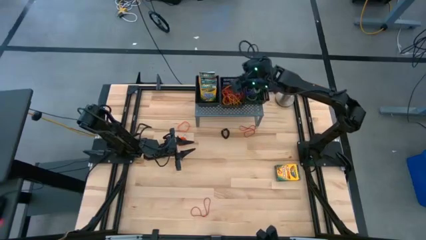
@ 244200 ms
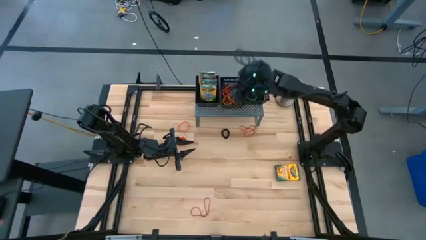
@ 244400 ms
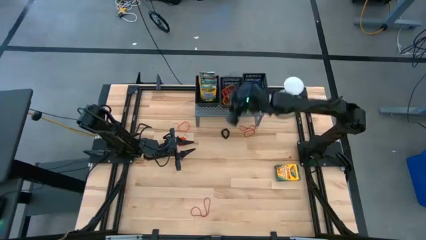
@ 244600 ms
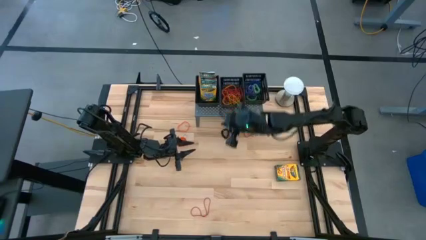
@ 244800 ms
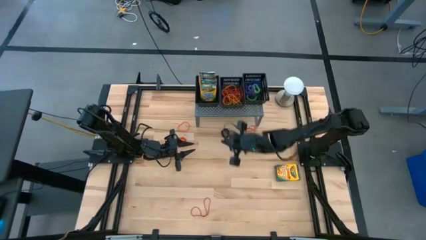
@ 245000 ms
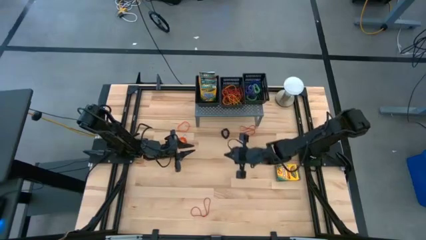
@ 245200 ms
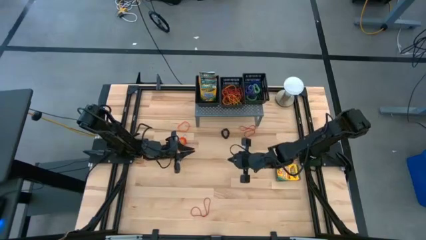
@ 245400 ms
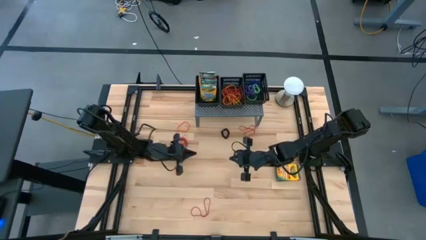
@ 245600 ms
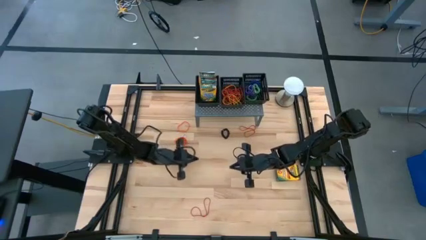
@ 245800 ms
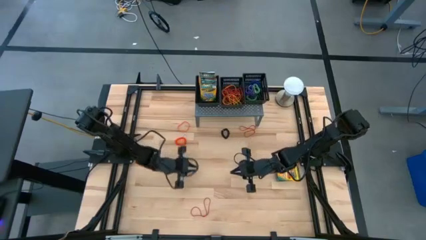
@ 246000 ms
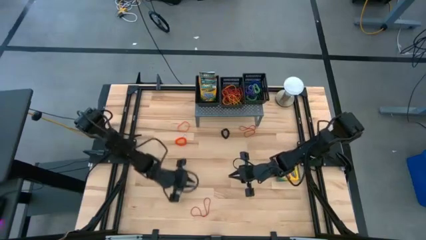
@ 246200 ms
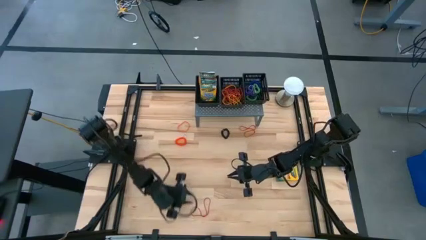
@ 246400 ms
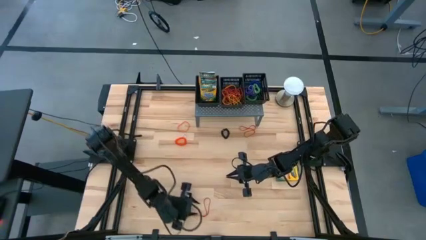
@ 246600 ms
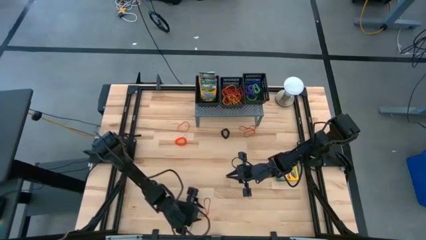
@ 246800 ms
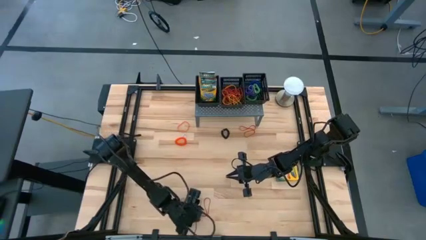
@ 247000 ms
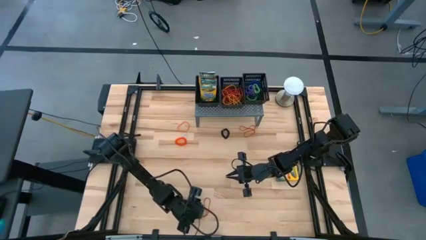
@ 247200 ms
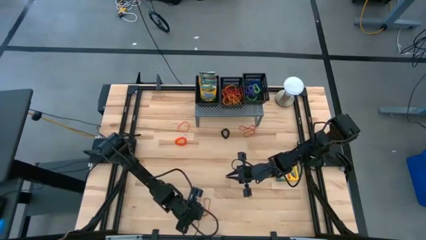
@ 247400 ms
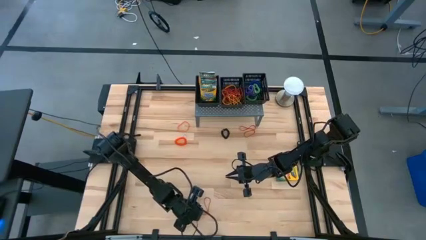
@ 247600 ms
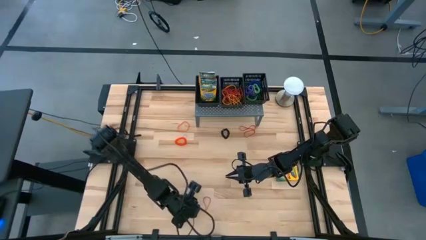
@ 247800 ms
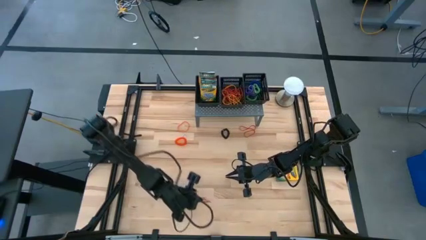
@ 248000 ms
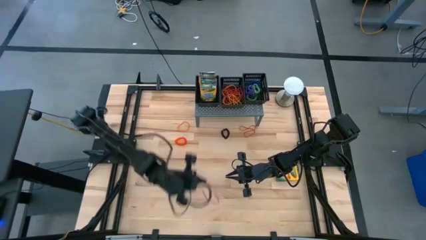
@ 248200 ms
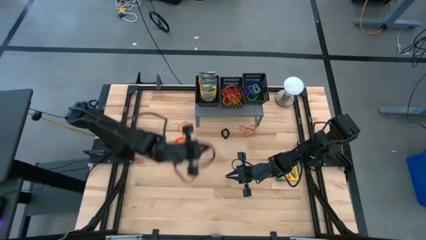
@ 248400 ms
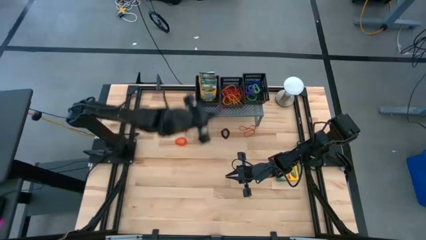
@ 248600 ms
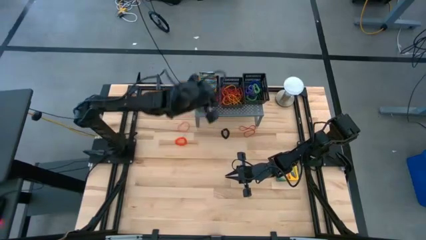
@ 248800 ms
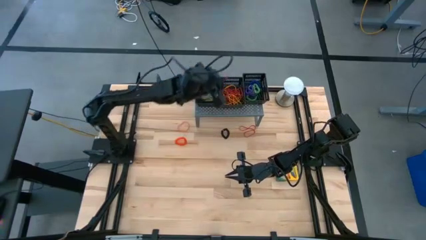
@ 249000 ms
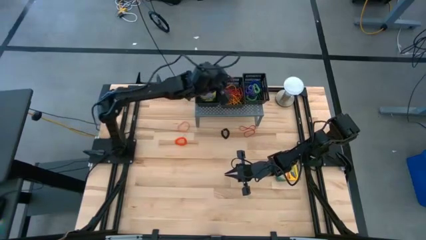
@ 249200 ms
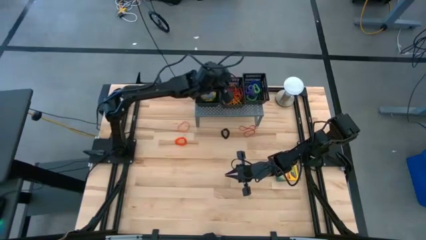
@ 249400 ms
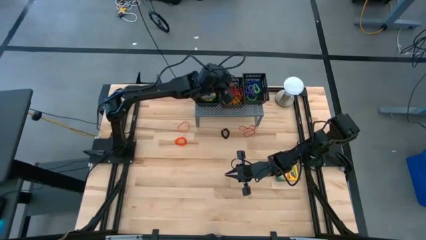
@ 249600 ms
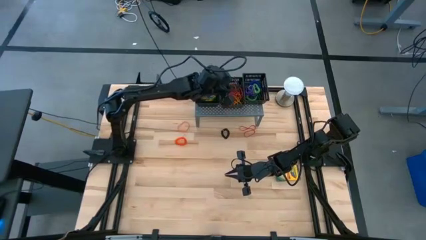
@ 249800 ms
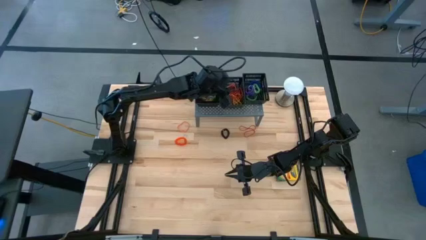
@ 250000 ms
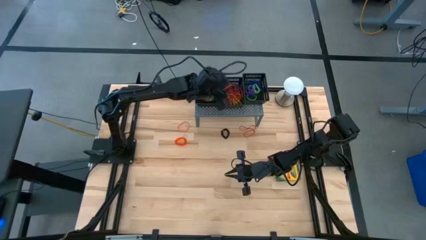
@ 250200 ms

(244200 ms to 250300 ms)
Task: Sort rubber bands into baskets
Put the red rubber band into the middle black basket on the shelf

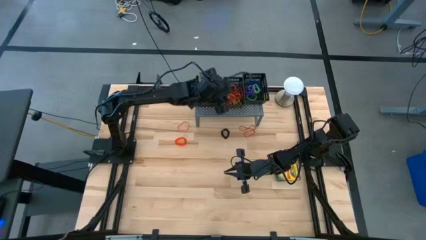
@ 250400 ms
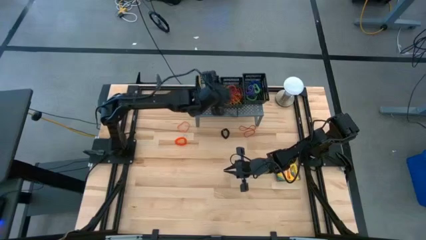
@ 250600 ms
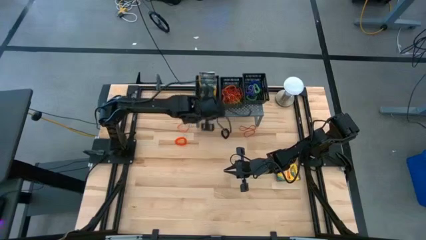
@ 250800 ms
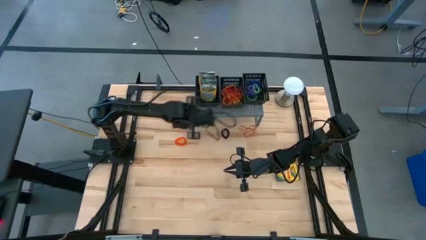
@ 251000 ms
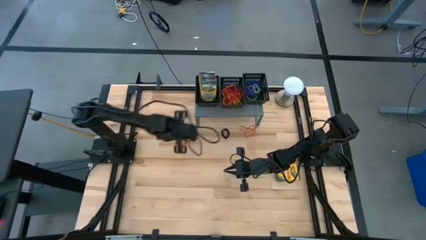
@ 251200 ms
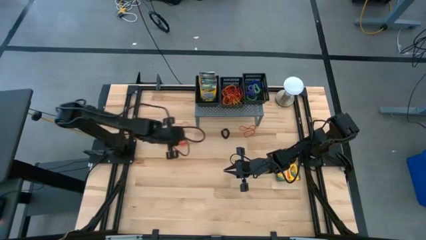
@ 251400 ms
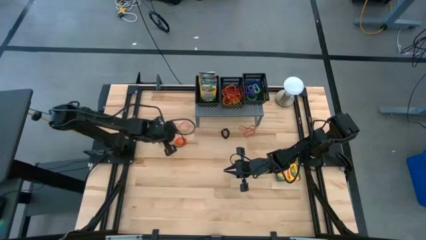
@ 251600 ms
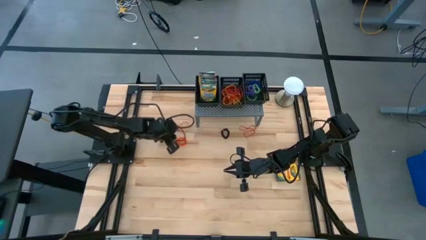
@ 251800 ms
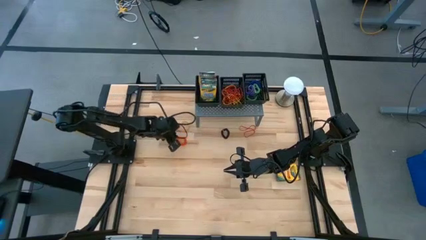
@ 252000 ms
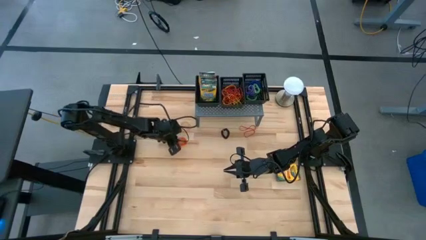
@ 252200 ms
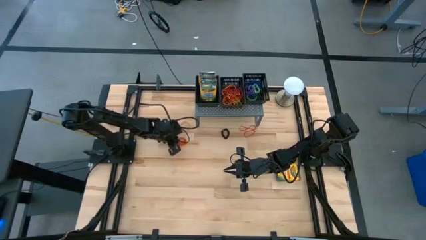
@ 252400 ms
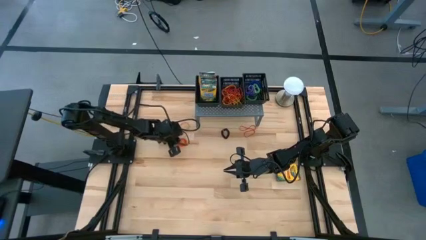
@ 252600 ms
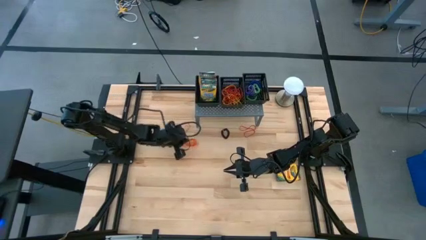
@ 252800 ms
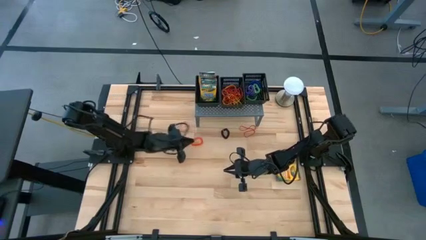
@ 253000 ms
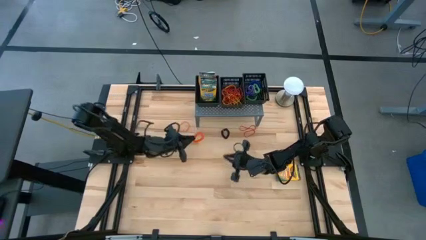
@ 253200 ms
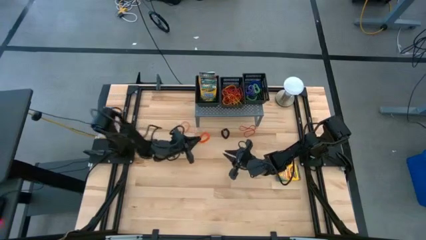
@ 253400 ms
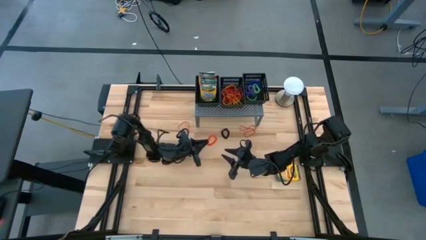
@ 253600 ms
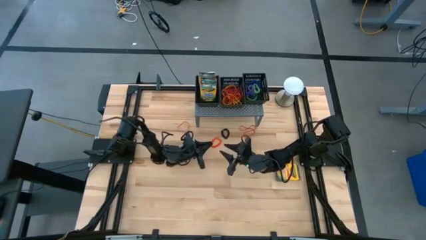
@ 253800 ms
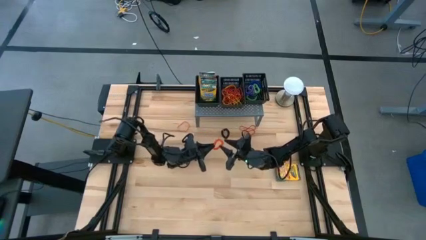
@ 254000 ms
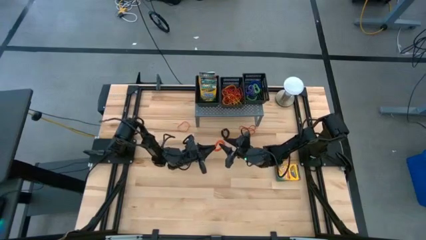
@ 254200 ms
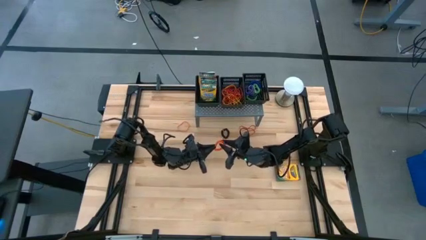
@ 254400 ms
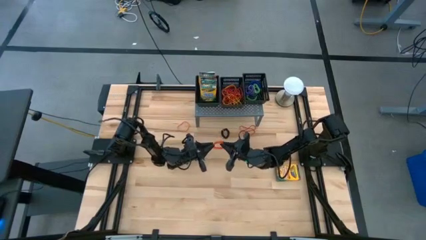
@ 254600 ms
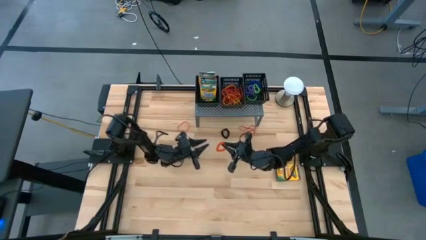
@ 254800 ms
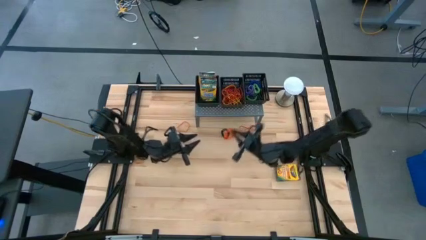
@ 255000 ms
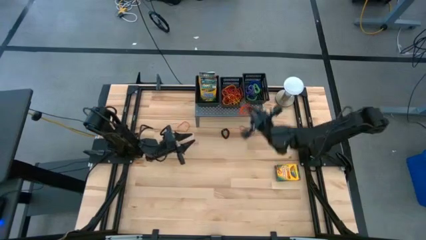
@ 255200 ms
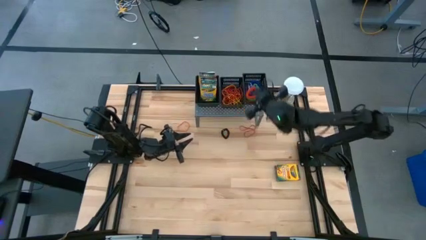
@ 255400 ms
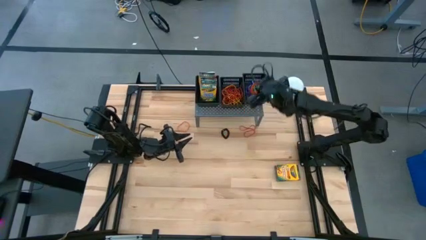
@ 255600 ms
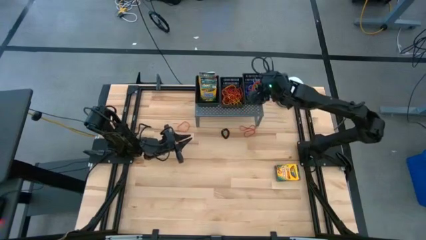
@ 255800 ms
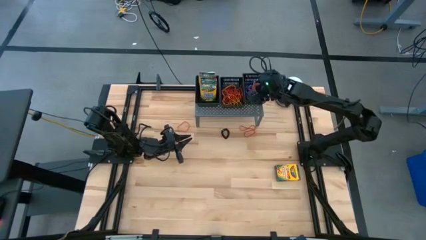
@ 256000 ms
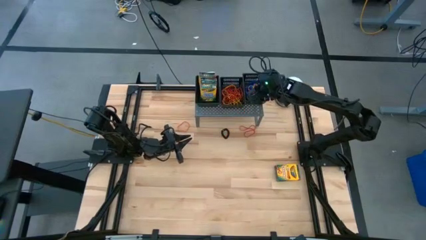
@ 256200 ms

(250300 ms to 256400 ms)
Put the orange spring rubberband into the right black basket on the shelf

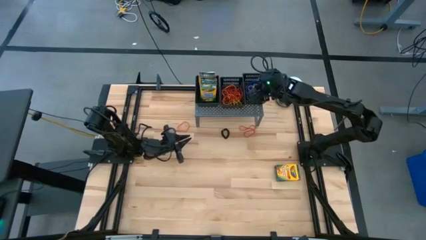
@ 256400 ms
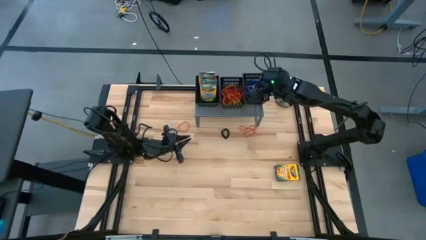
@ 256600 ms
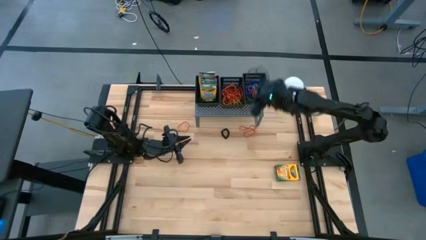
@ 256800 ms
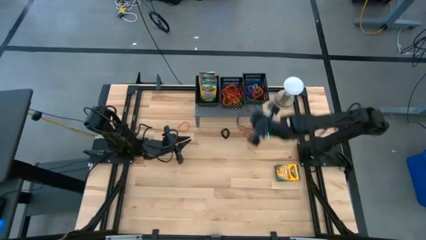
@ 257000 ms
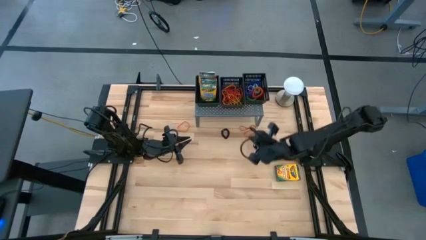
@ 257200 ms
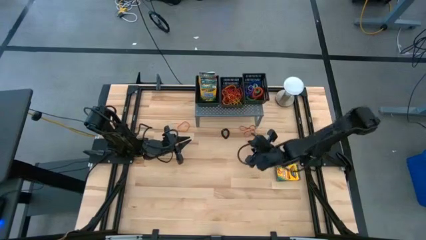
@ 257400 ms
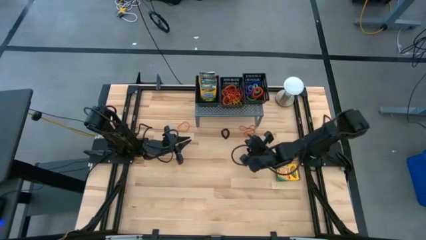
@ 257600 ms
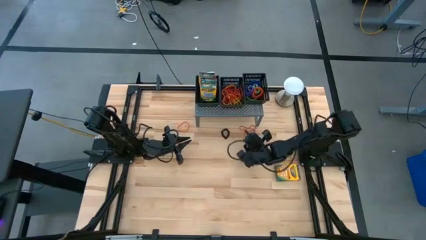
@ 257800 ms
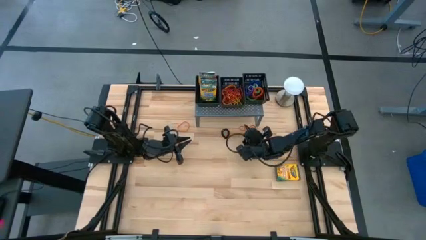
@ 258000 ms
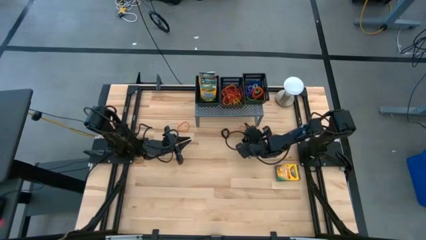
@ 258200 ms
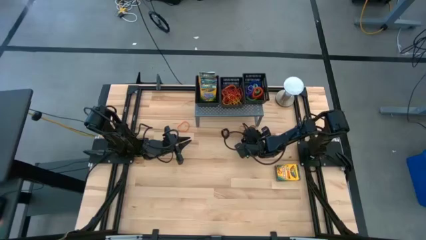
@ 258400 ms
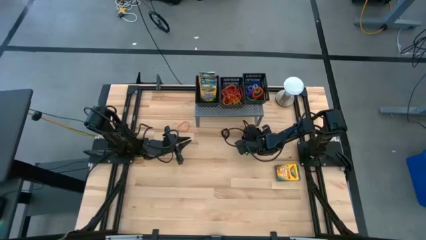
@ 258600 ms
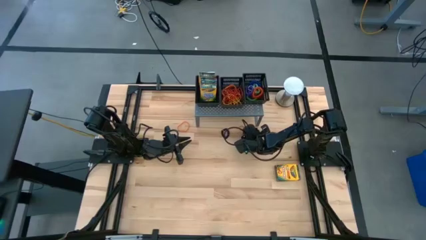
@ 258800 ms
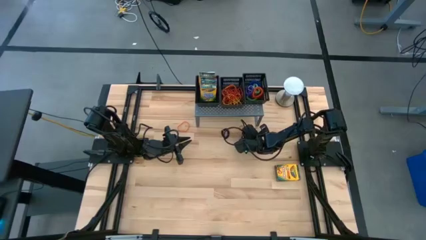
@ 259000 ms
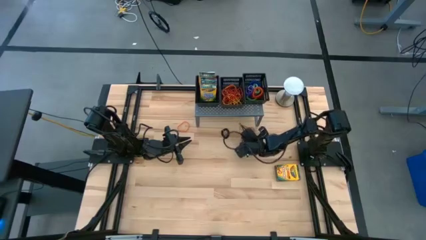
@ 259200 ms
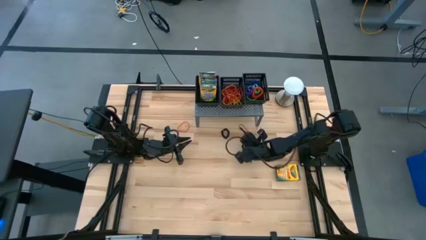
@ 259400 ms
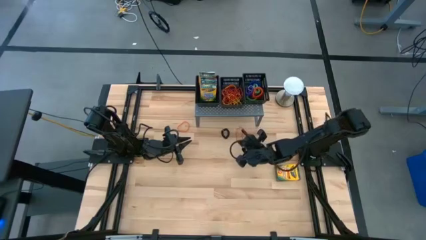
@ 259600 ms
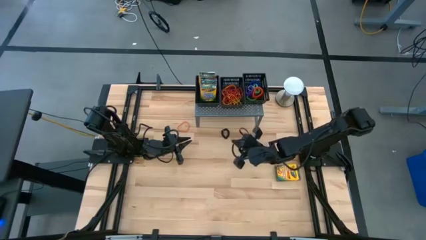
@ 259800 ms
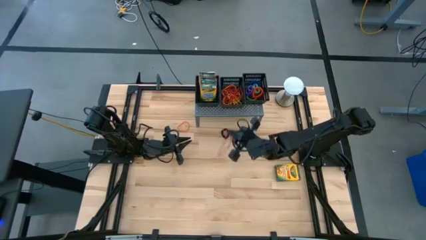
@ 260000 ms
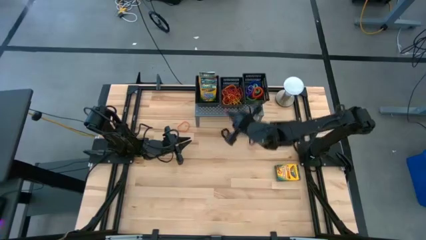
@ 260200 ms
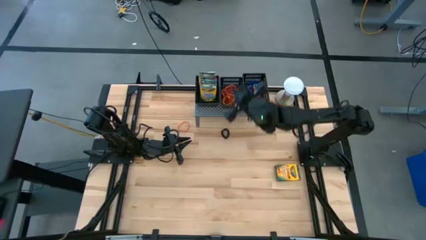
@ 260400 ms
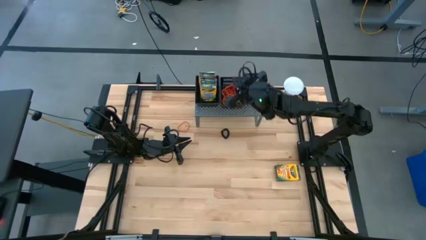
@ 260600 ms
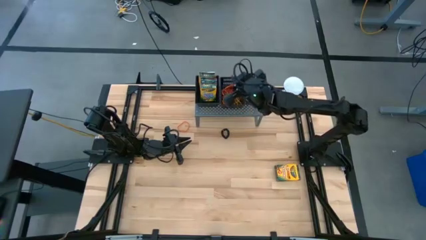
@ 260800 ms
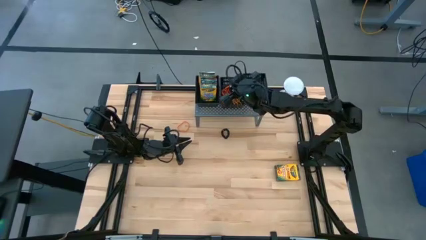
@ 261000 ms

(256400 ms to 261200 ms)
Put the red rubber band into the middle black basket on the shelf
